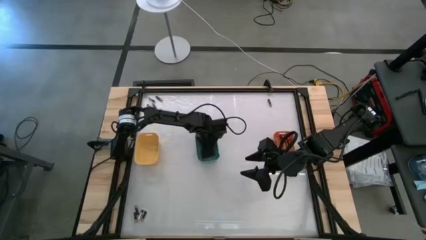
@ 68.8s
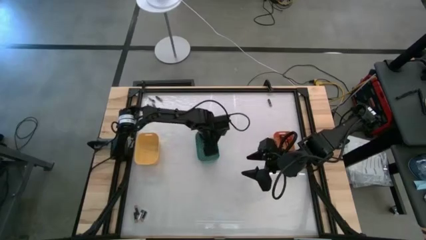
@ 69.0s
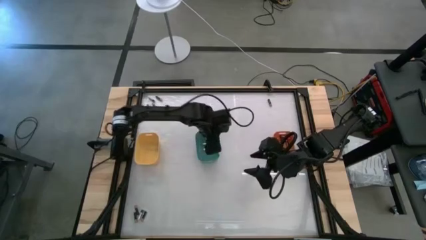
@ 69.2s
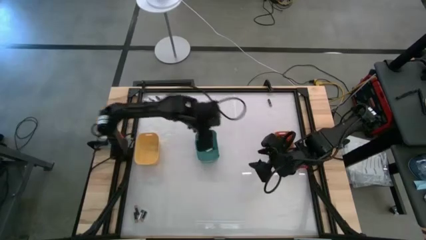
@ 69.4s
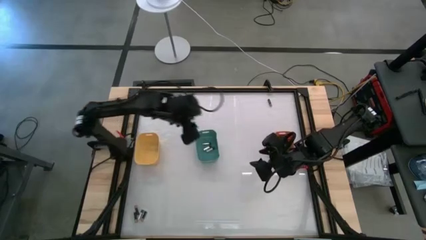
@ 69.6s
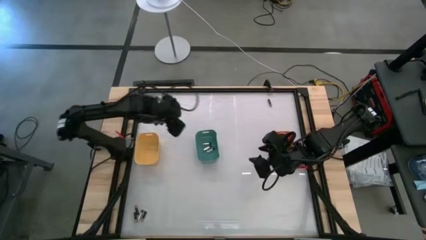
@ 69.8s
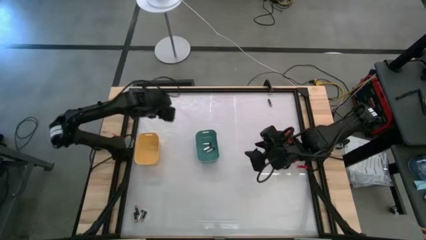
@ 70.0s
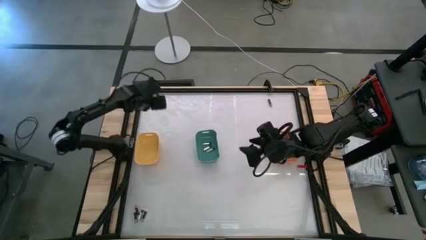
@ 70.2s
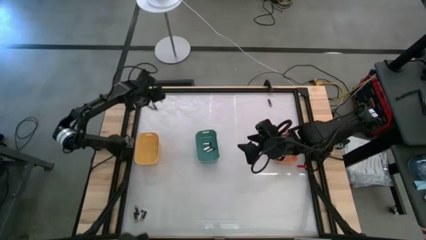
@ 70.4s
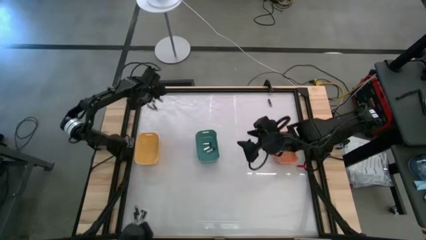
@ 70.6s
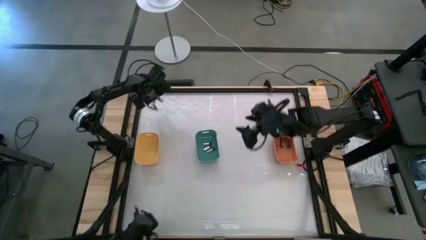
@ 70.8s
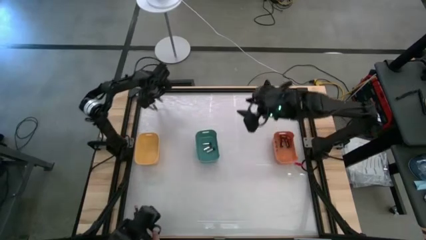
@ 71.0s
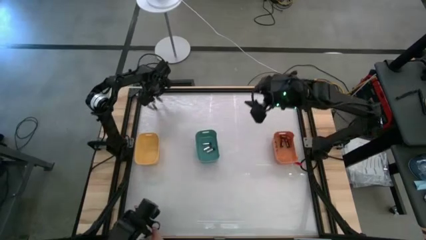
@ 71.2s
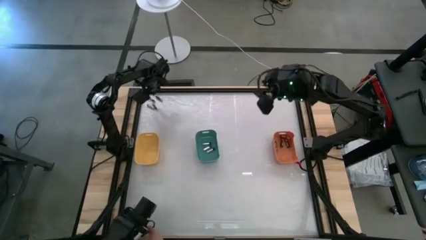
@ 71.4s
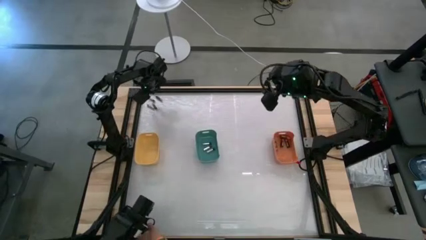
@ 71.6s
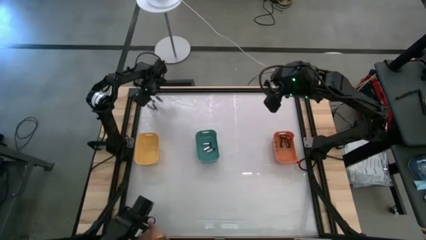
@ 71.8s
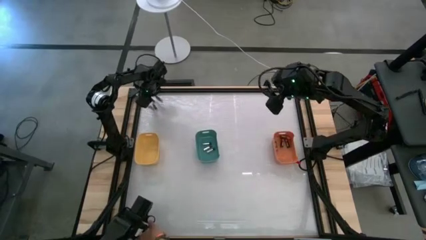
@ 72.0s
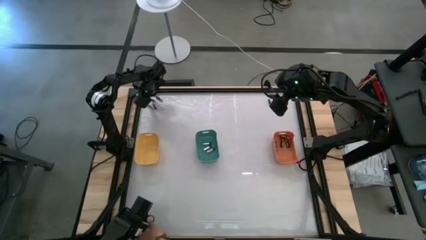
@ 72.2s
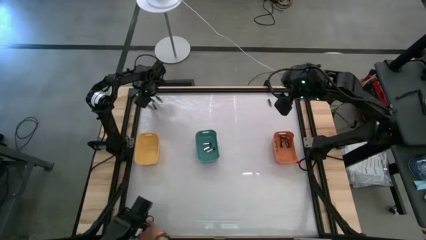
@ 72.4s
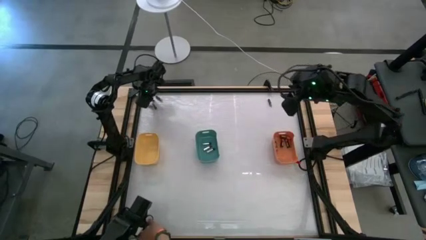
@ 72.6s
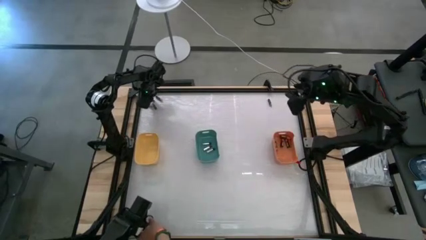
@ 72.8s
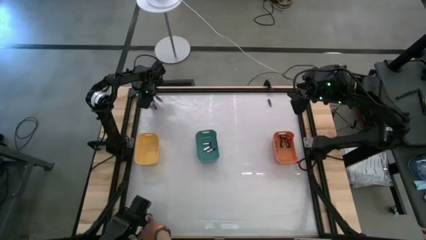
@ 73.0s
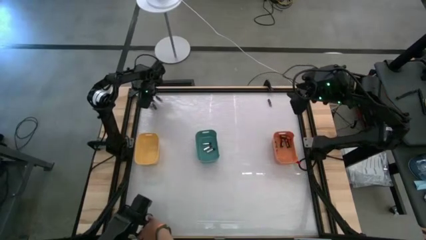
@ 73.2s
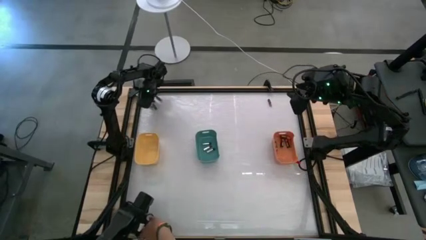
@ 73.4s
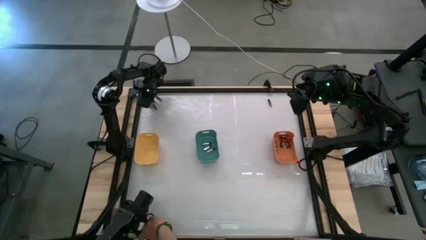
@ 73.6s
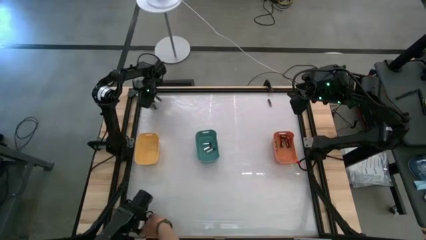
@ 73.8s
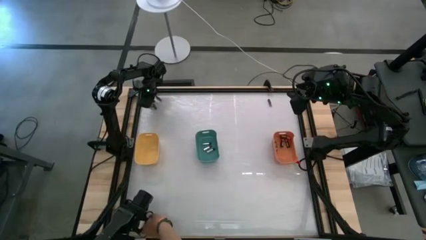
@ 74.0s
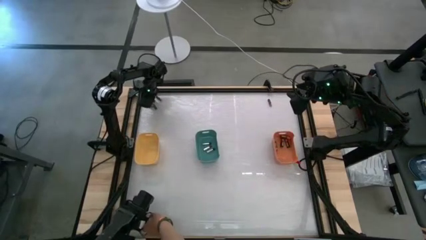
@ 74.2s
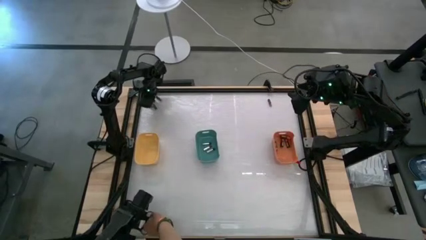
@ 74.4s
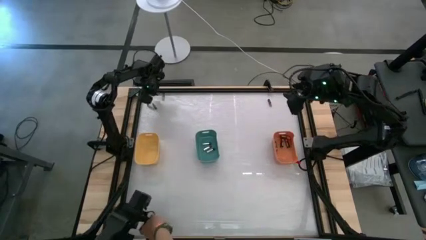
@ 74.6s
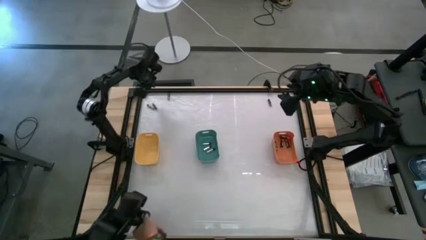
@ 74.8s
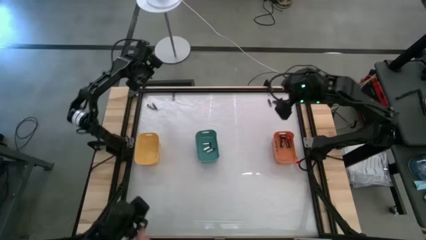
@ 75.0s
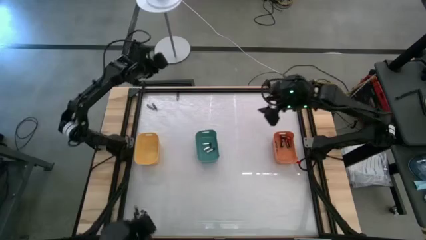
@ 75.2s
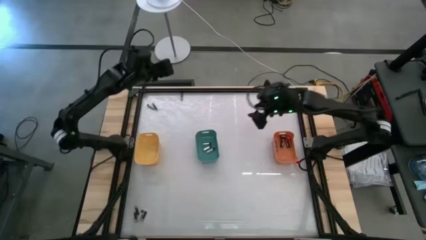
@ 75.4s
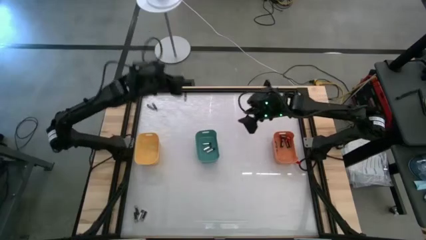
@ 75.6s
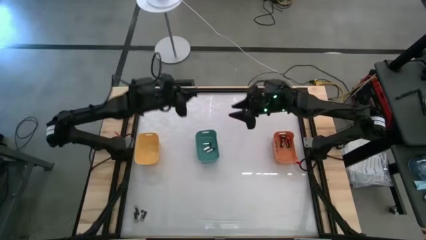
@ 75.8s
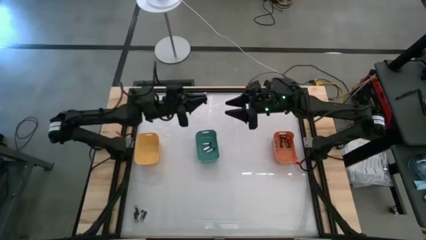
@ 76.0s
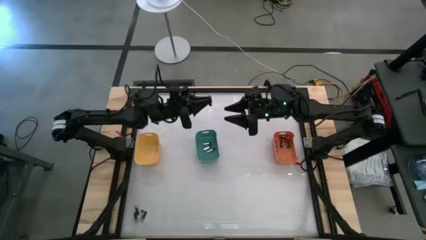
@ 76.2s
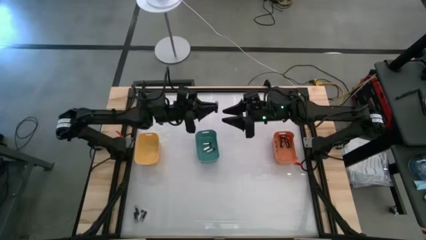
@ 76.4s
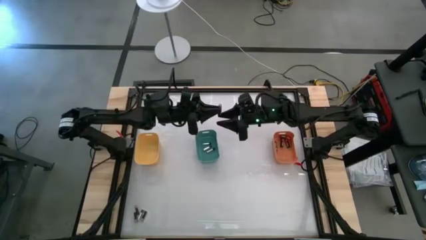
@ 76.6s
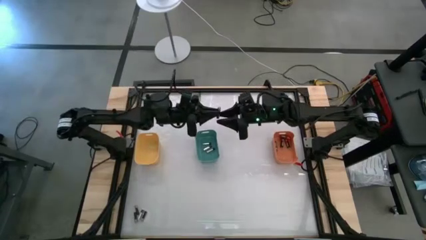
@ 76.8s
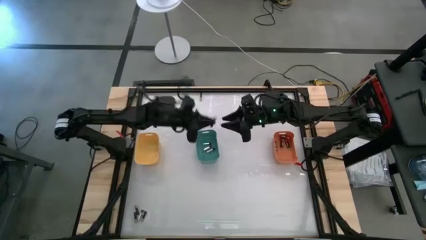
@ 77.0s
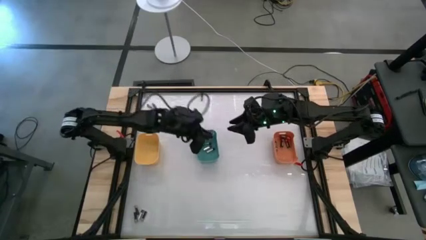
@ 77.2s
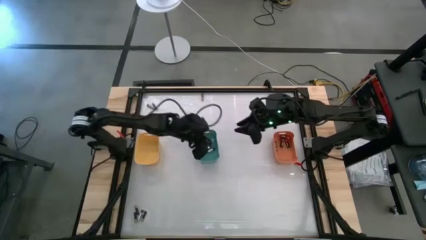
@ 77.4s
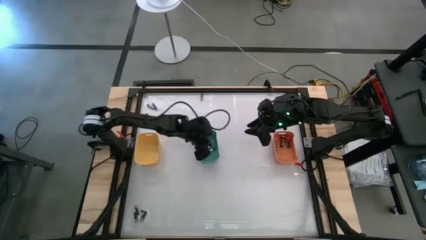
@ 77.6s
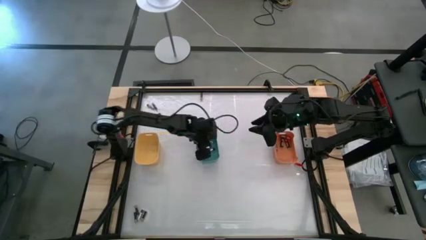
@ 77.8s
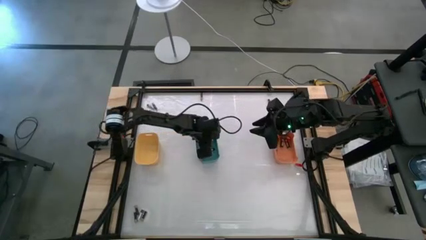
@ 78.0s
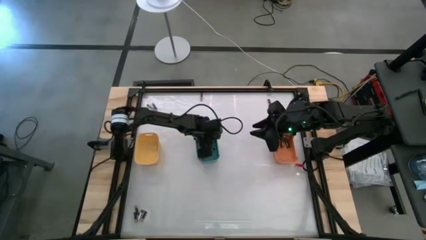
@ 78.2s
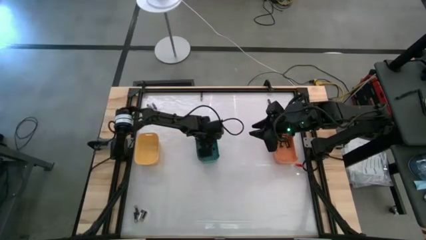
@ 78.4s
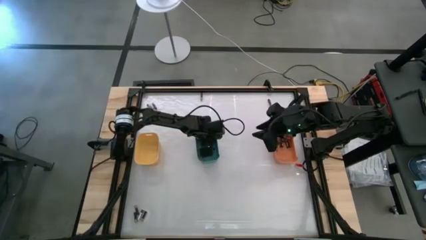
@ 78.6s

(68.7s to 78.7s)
Task: Sort batteries
Put the silver battery into the green bin

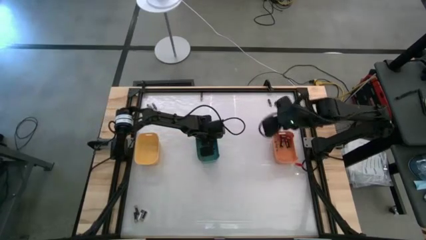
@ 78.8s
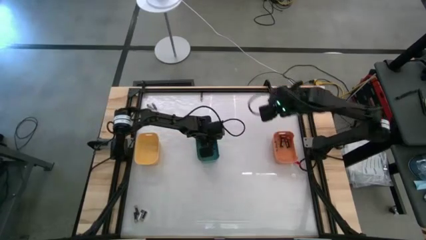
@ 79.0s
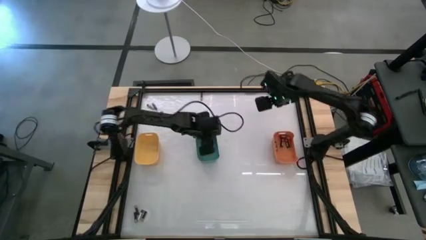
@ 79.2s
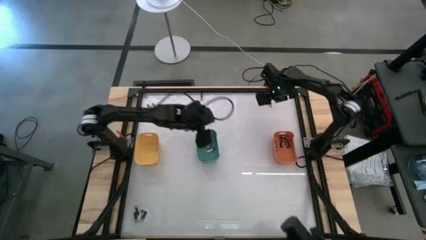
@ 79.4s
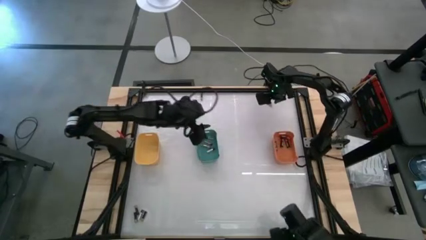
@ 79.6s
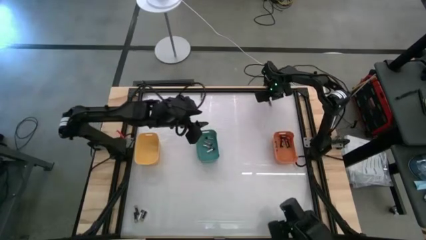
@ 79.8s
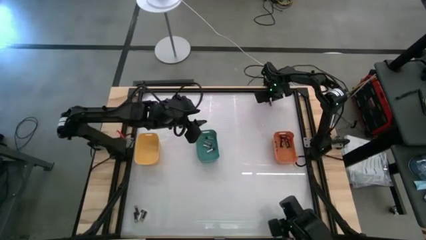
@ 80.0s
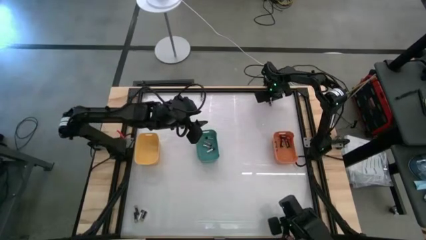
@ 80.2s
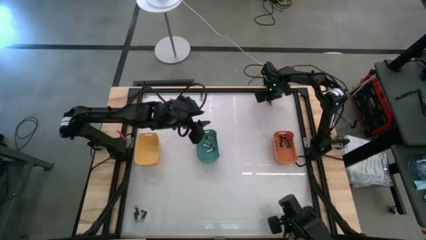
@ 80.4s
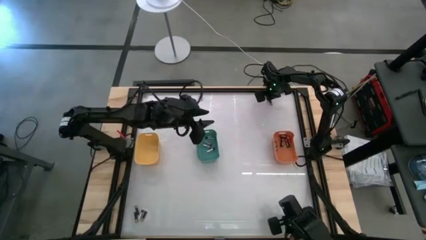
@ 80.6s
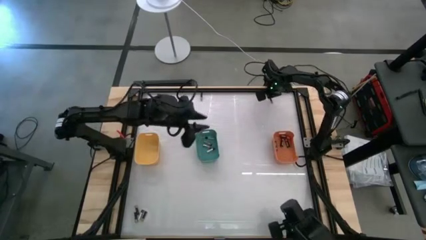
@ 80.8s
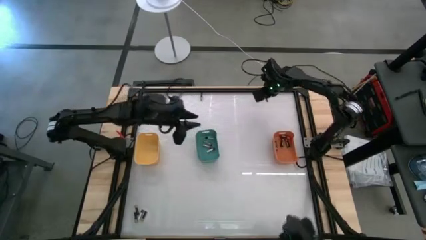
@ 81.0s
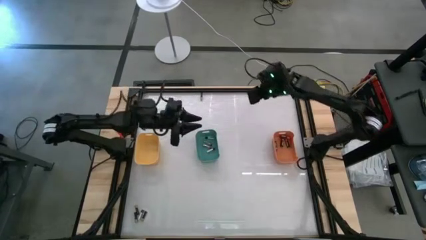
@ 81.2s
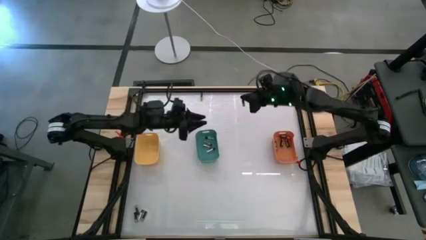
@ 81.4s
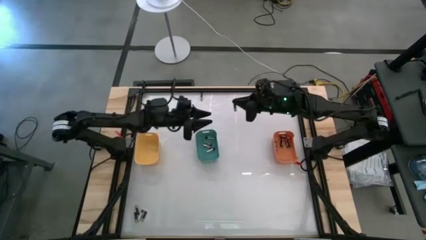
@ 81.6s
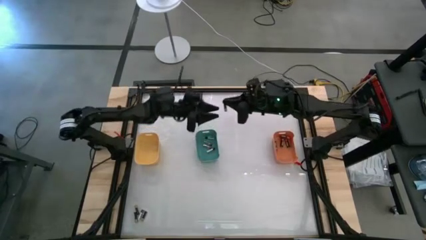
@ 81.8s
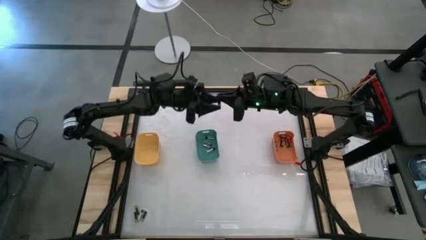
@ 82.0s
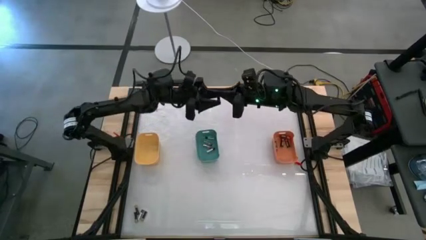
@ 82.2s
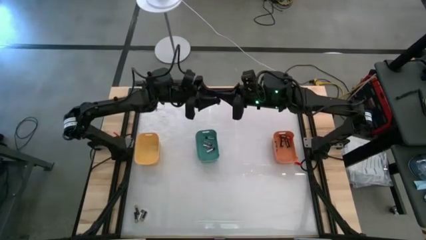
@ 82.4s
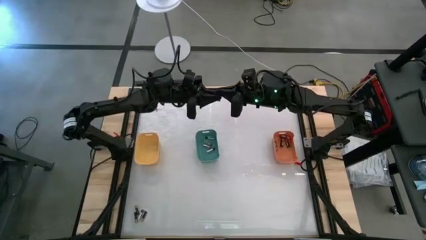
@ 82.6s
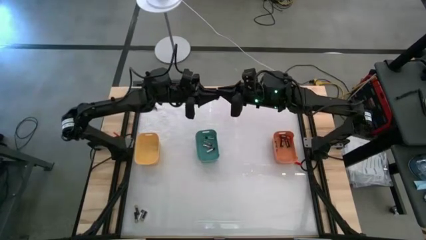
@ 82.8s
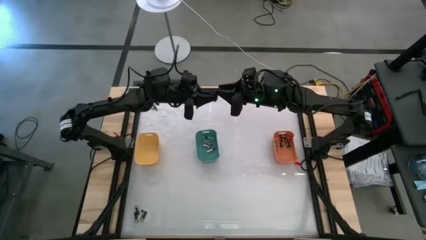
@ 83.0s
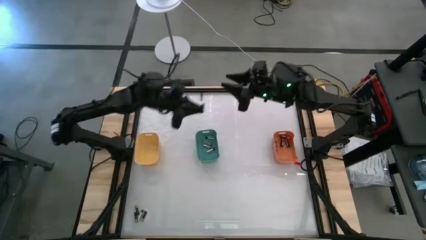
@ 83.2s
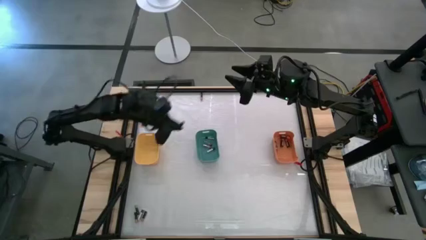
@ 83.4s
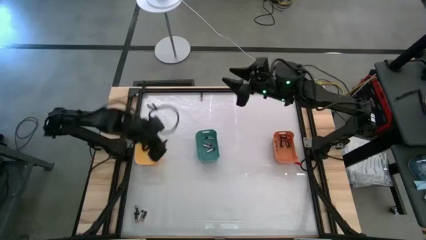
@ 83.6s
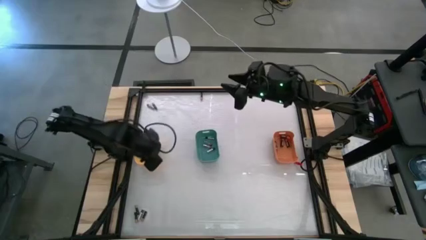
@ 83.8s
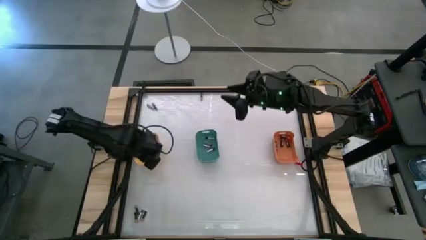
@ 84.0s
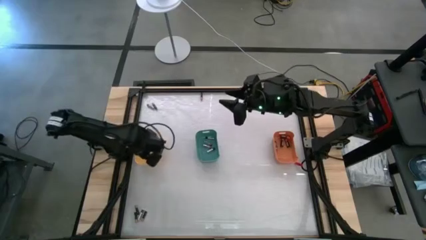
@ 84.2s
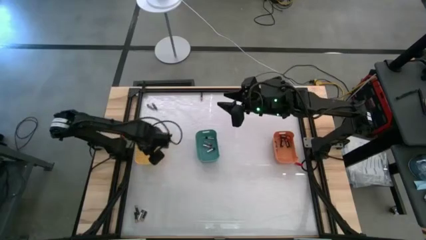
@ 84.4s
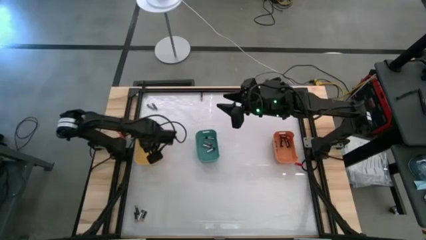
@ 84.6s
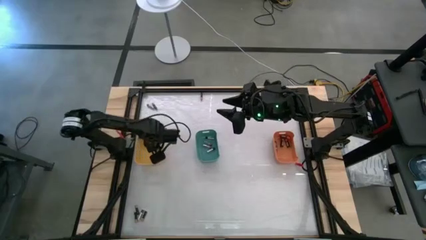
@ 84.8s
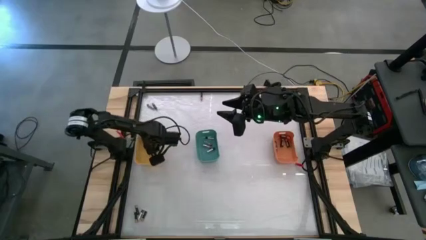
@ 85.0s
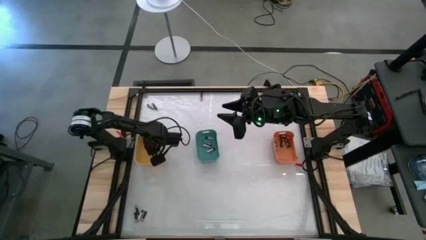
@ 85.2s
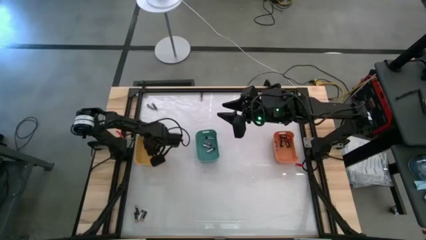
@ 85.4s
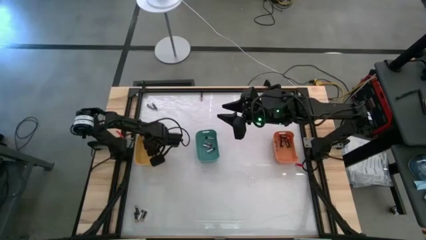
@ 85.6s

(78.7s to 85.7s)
Put the black battery into the yellow bin
